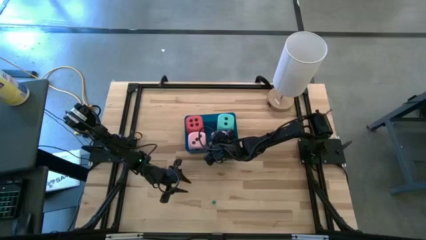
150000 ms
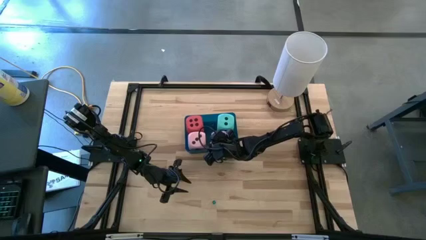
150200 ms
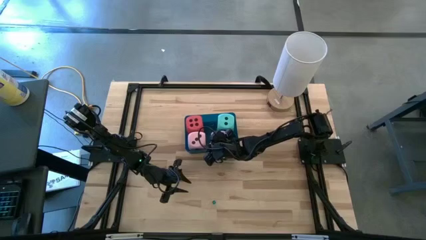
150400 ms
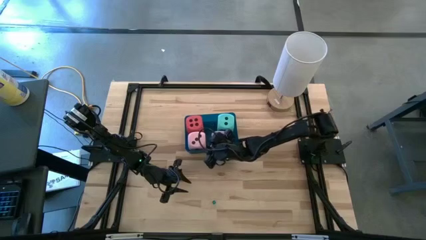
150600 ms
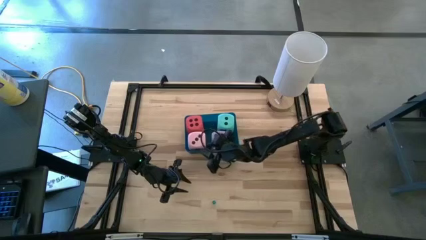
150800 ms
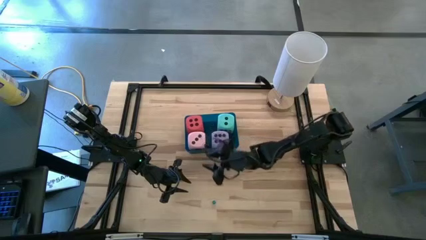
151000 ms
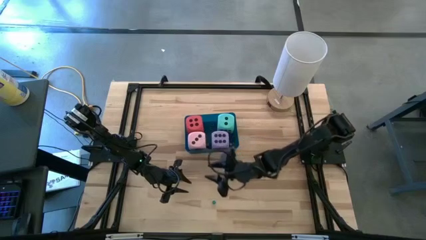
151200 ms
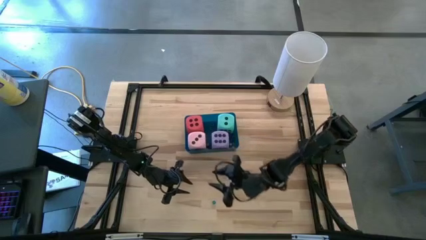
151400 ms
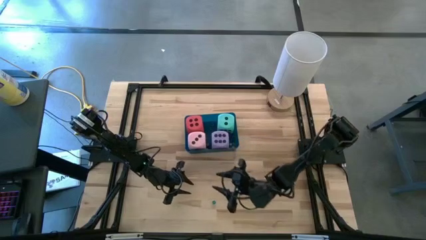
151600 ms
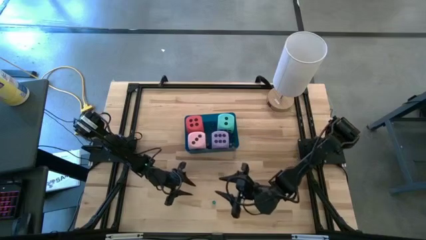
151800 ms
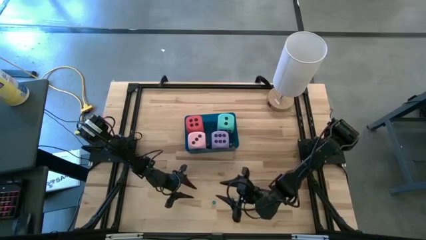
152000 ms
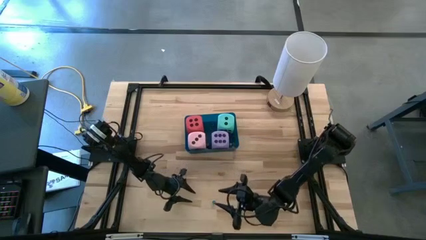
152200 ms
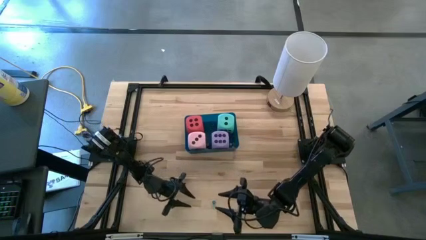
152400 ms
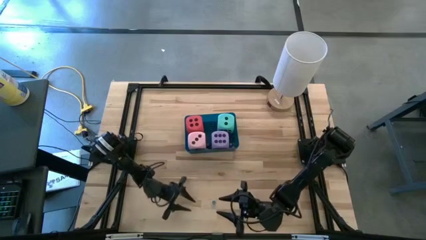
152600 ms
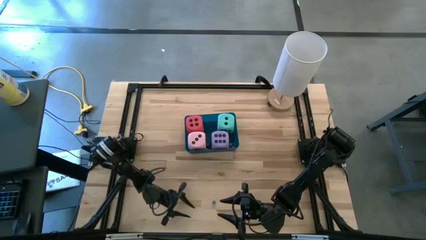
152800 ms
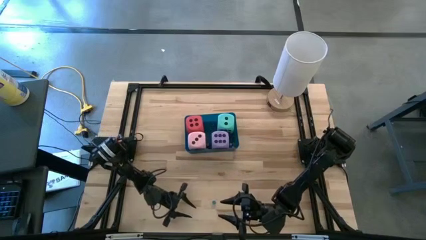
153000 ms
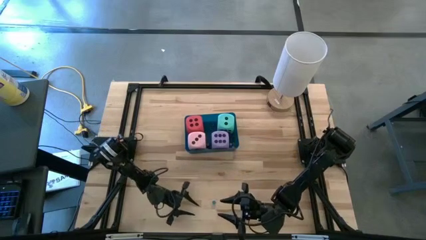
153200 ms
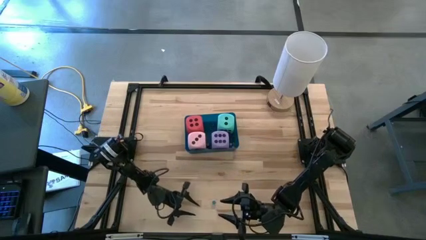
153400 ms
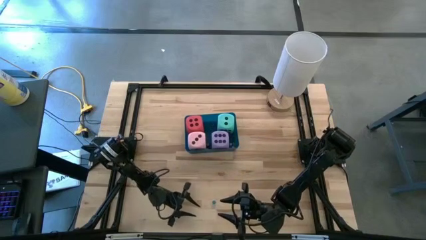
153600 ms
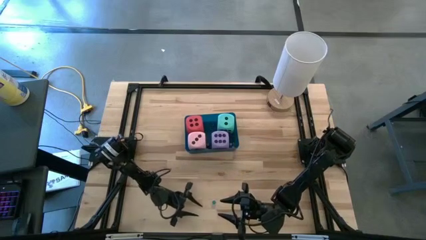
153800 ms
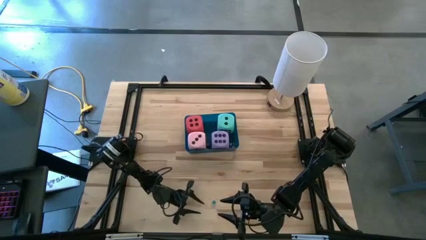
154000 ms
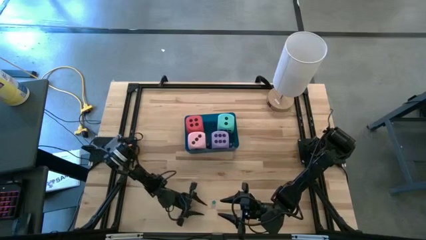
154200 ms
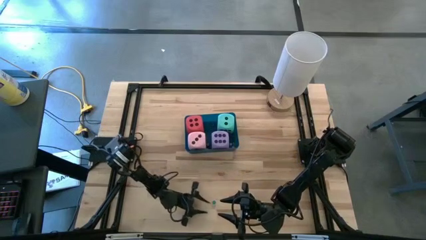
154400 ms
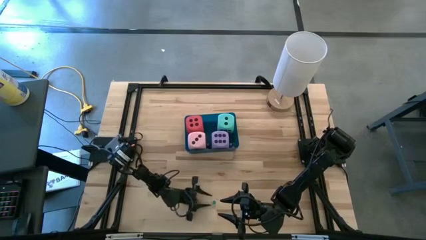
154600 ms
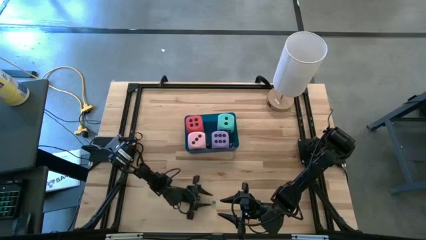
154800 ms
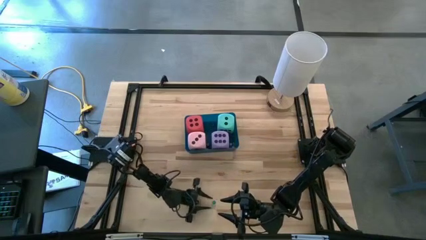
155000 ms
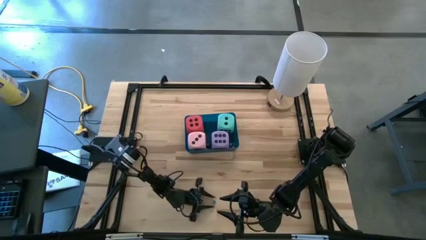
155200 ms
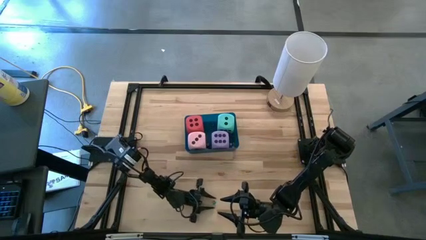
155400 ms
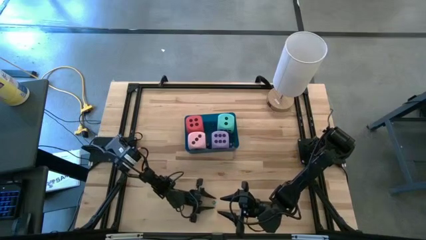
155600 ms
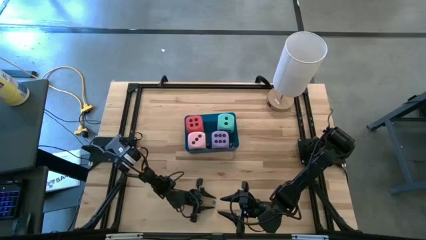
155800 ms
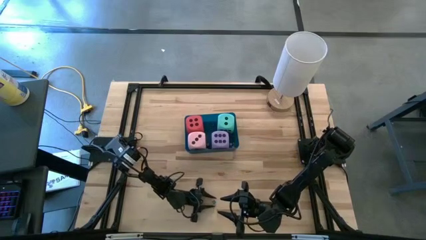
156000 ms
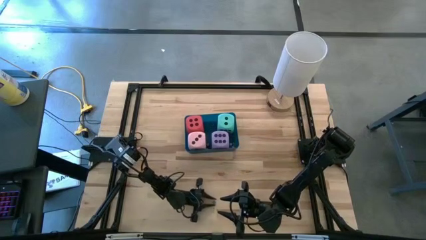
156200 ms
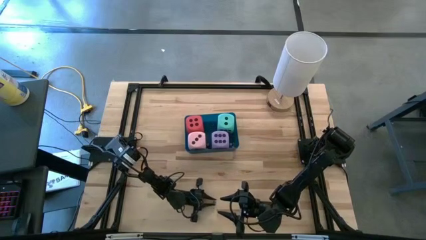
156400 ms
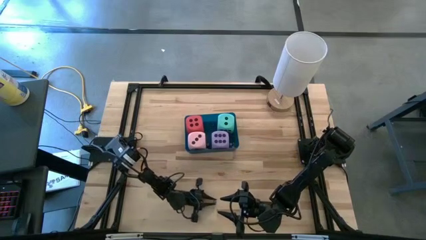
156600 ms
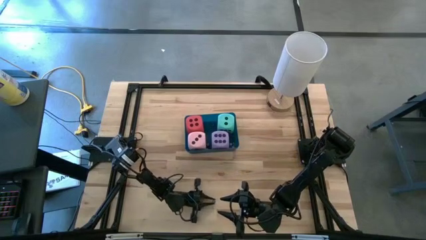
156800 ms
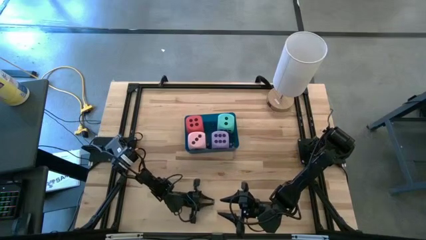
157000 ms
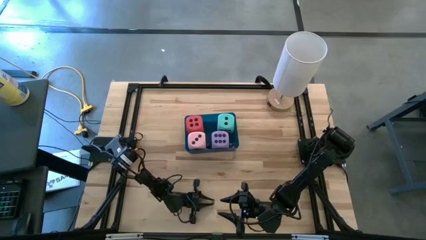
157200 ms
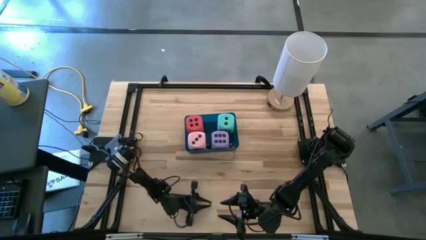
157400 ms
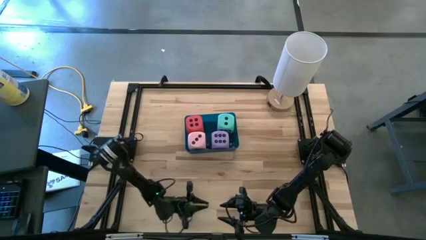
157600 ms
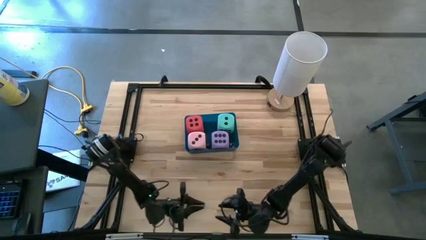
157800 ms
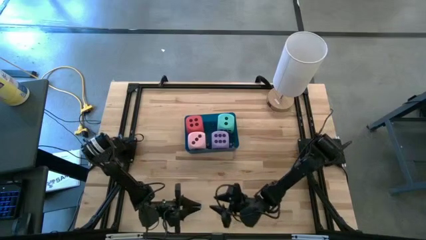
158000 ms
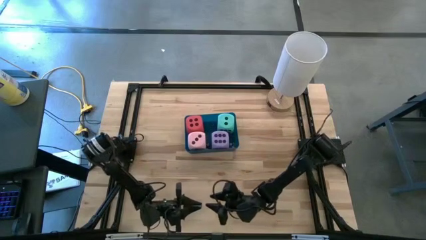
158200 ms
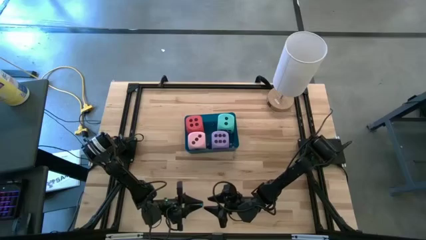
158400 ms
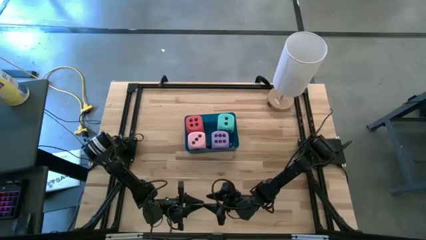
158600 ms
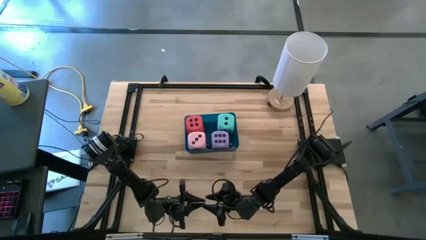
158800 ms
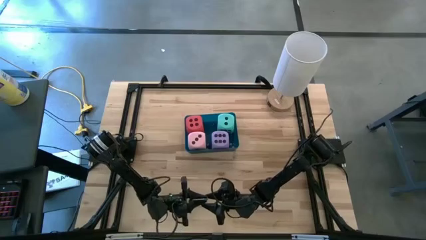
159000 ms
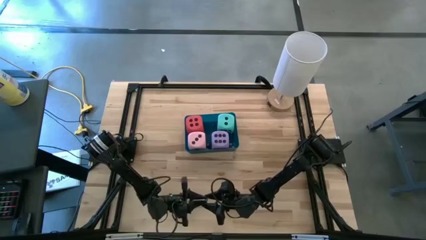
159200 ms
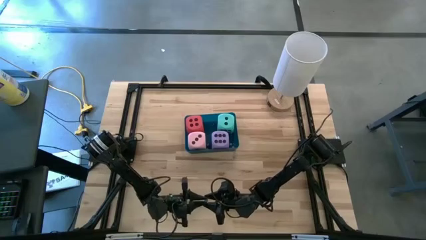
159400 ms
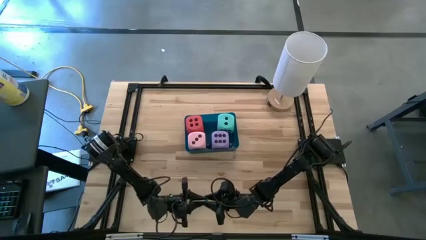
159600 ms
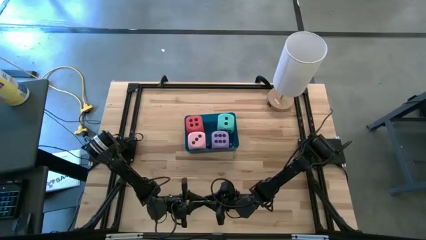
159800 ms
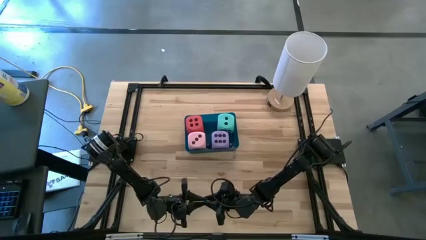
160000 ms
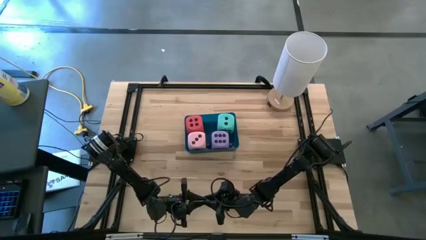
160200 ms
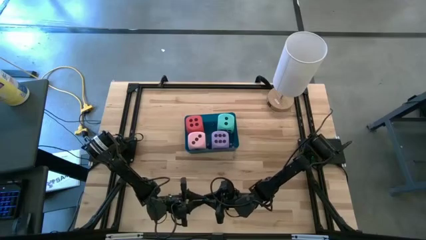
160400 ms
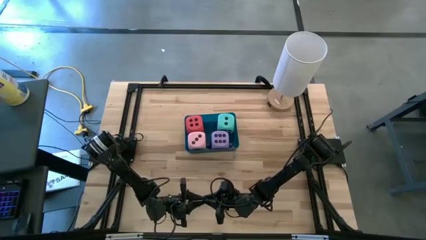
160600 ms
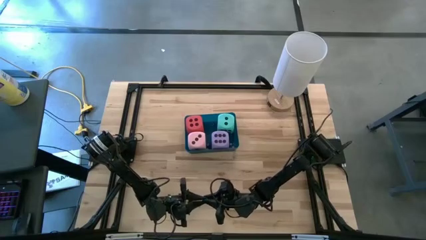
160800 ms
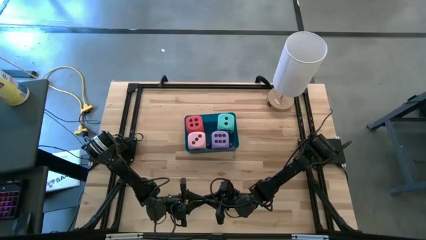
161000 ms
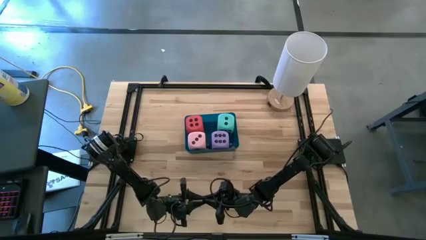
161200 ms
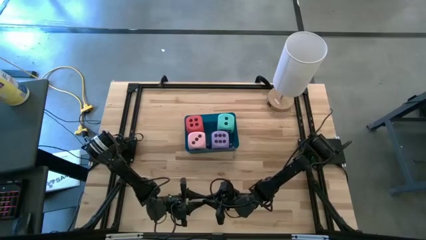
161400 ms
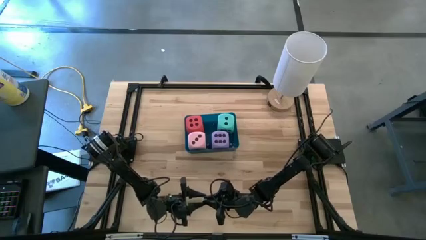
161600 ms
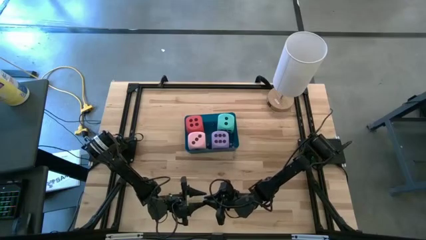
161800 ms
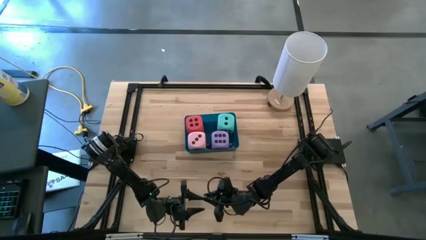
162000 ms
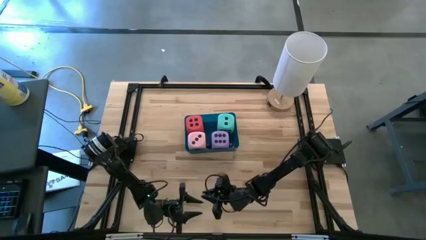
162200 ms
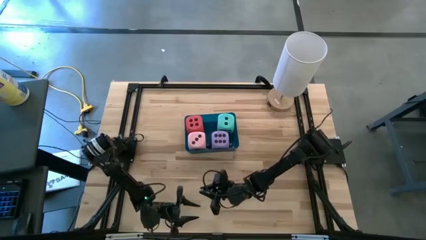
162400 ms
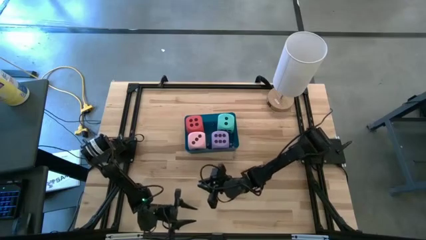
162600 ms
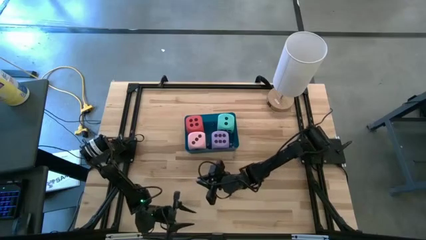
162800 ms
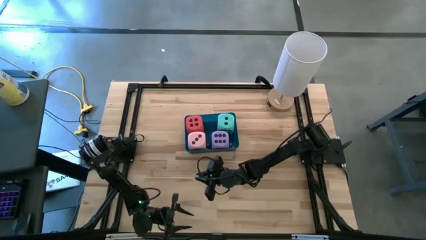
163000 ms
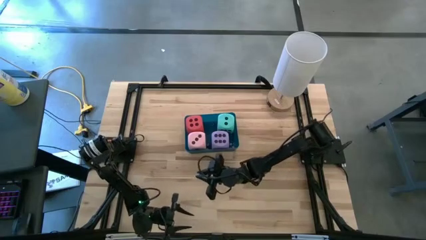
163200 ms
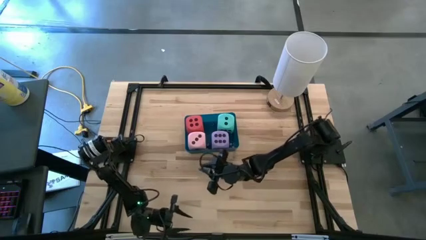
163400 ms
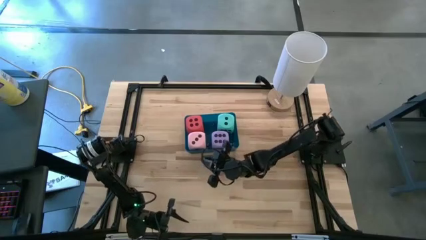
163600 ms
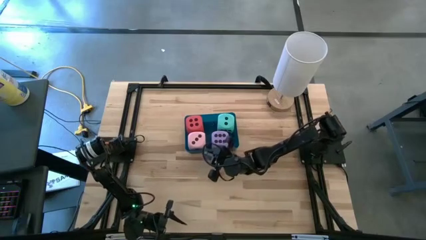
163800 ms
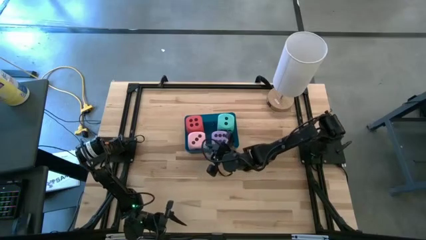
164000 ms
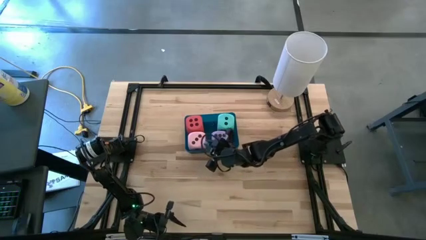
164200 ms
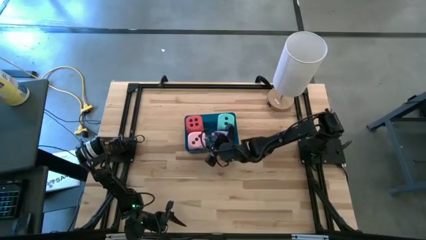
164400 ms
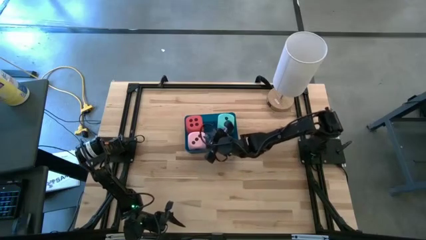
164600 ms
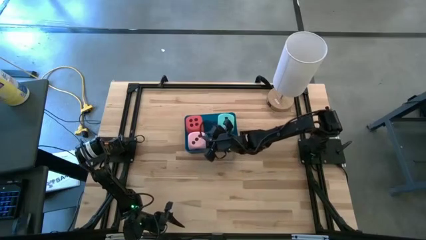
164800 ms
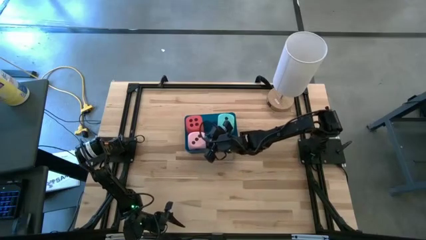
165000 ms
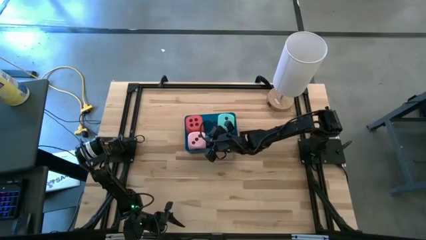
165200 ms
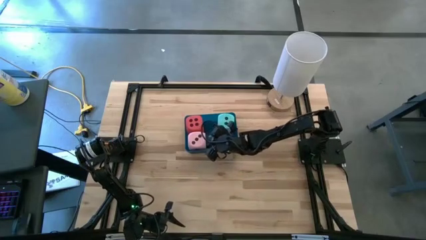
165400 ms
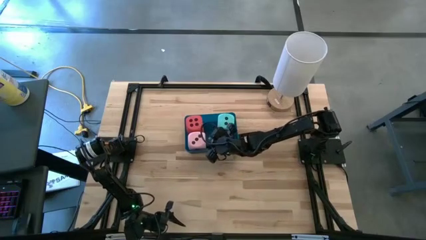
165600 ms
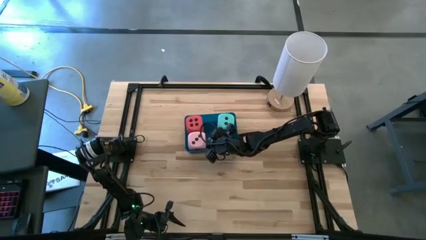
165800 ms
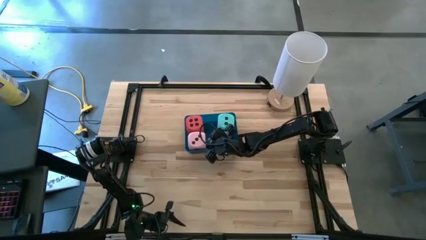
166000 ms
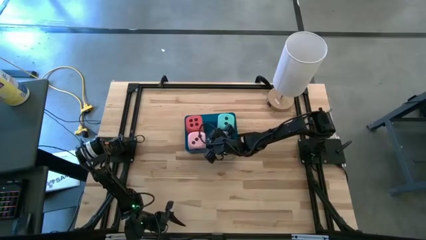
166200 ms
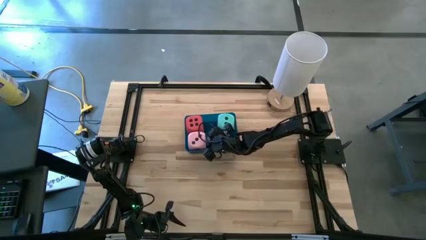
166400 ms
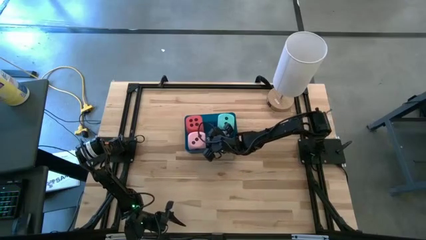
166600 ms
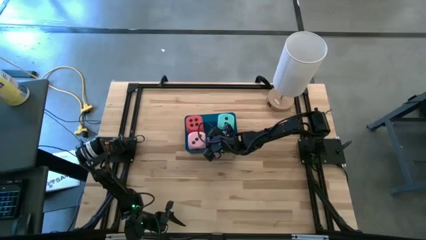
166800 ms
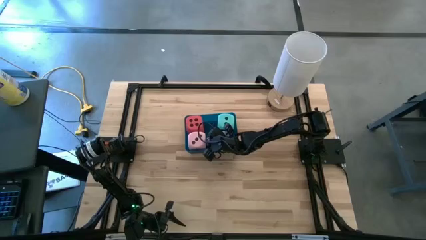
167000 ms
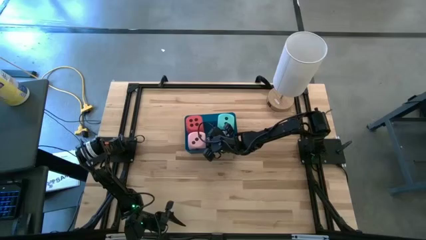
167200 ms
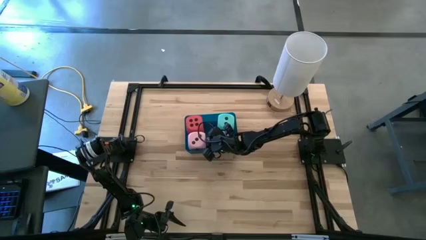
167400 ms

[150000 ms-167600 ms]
Task: Pick & Place Dice
Put the blue die into the blue bin
